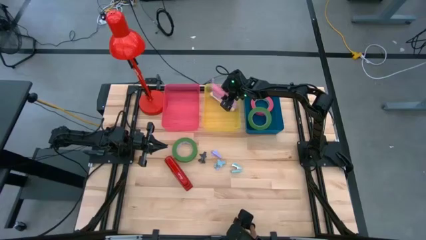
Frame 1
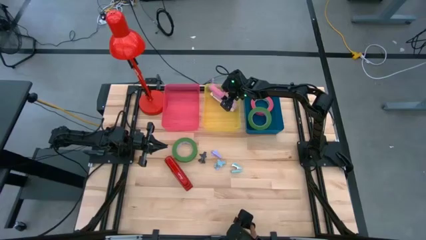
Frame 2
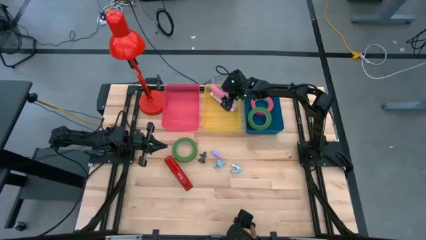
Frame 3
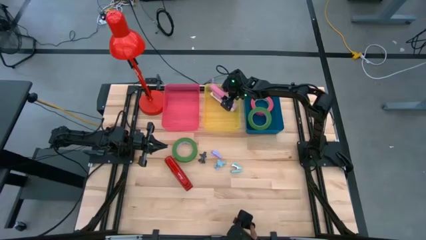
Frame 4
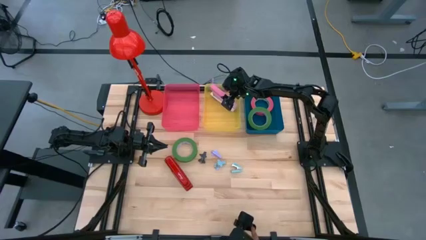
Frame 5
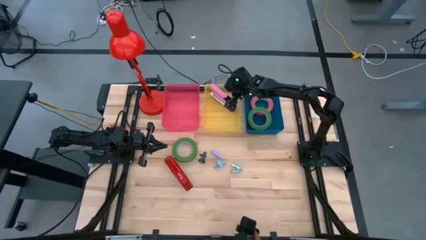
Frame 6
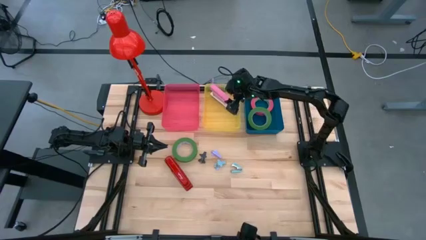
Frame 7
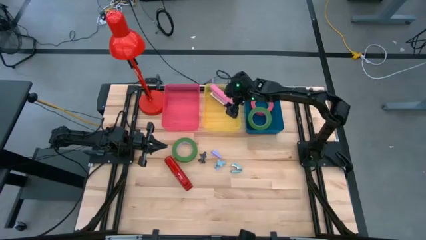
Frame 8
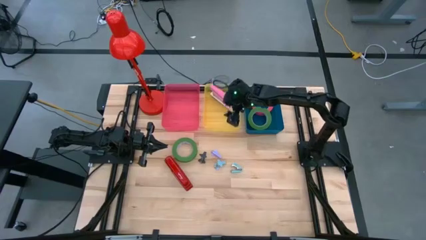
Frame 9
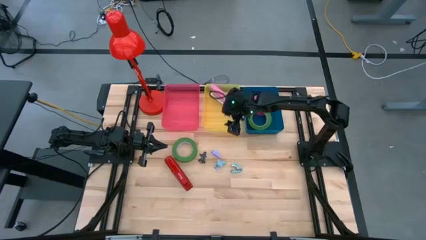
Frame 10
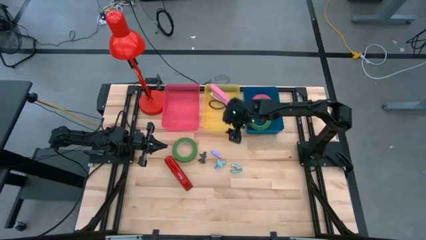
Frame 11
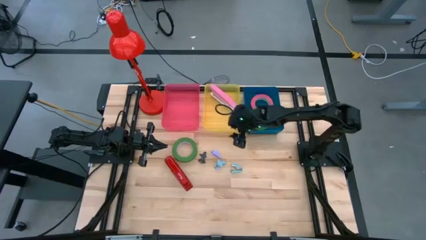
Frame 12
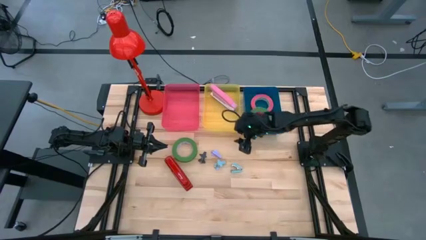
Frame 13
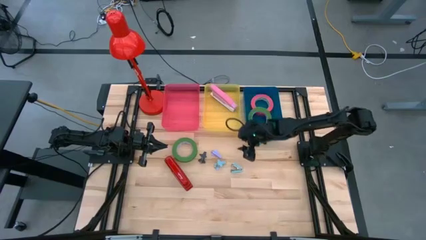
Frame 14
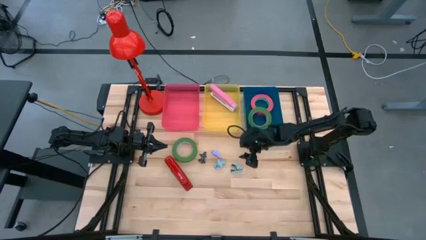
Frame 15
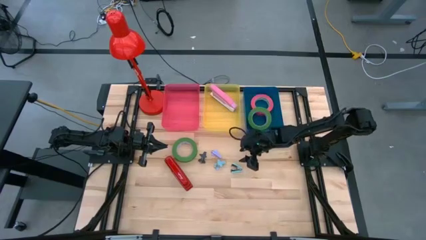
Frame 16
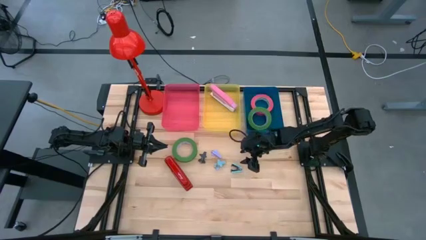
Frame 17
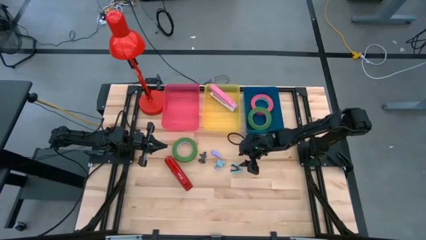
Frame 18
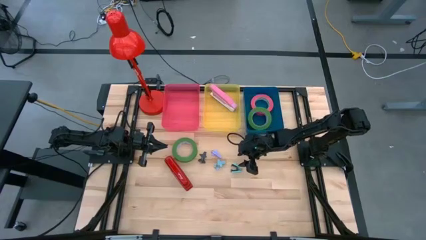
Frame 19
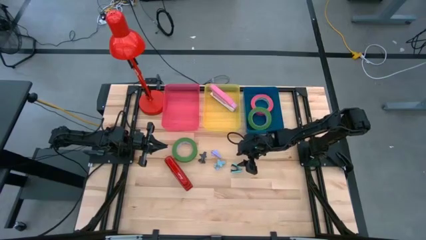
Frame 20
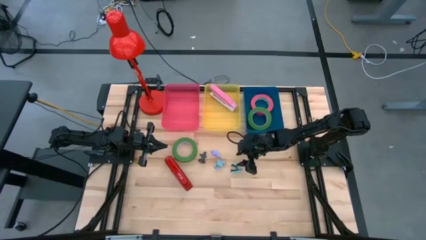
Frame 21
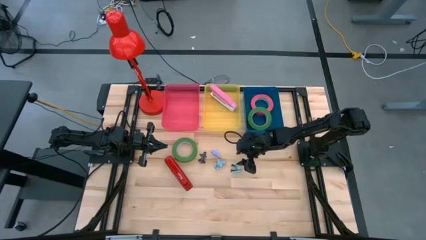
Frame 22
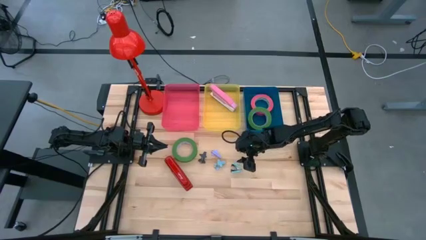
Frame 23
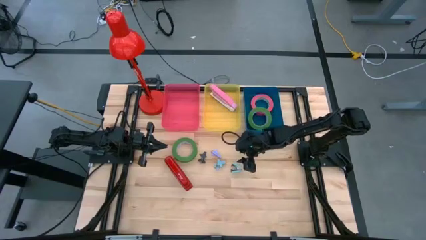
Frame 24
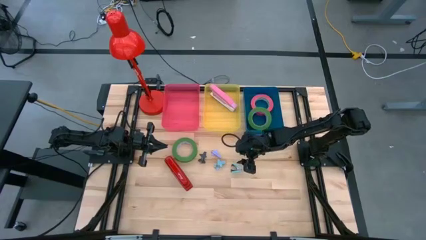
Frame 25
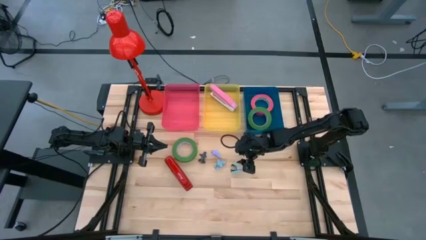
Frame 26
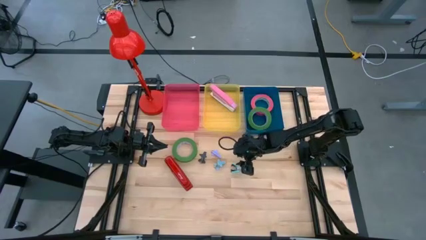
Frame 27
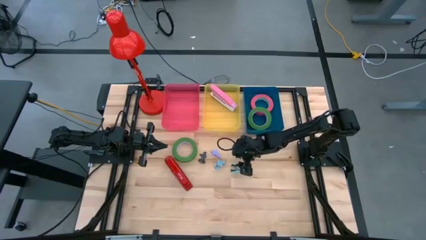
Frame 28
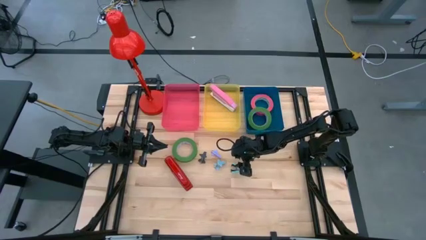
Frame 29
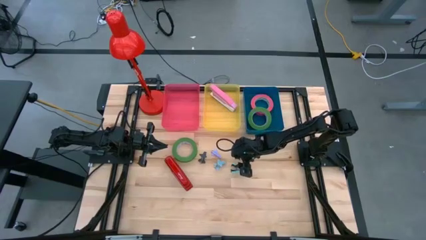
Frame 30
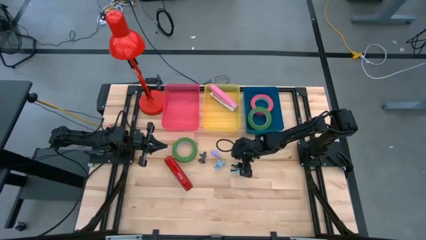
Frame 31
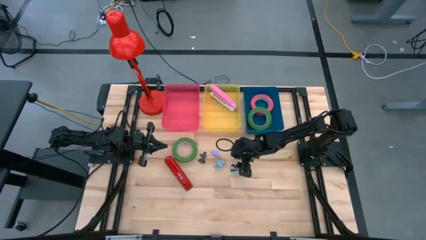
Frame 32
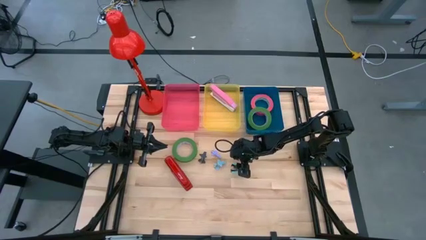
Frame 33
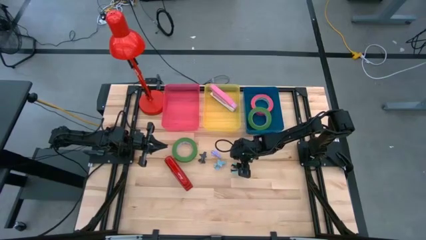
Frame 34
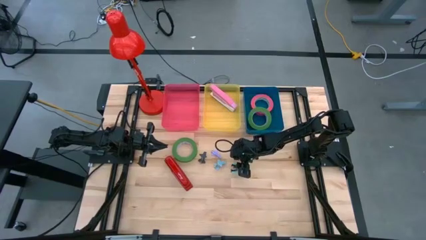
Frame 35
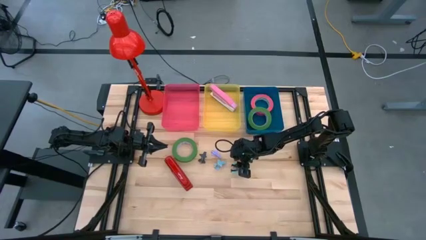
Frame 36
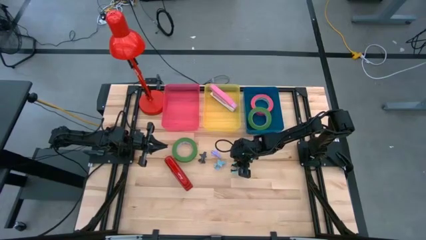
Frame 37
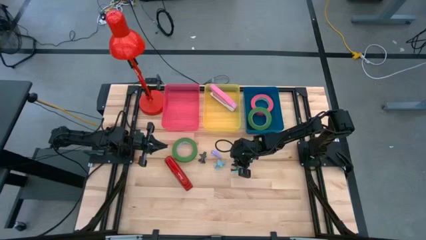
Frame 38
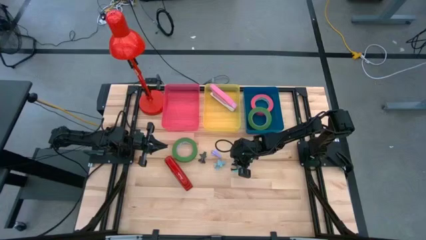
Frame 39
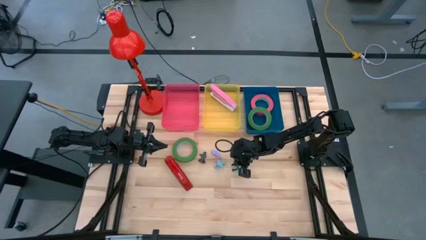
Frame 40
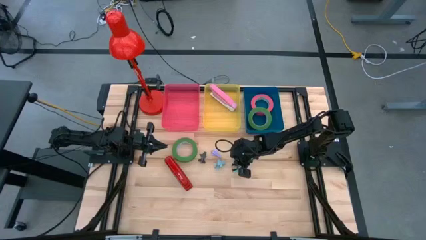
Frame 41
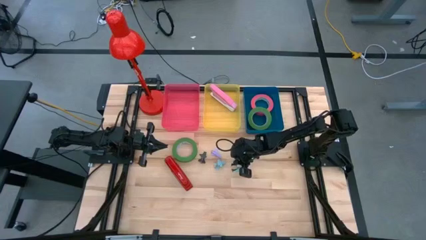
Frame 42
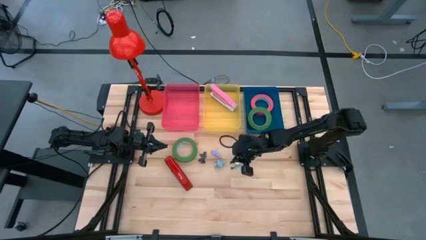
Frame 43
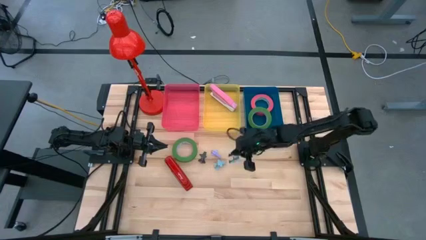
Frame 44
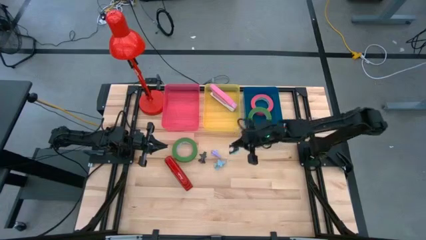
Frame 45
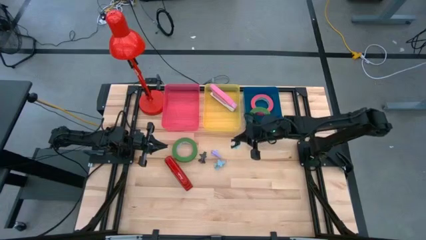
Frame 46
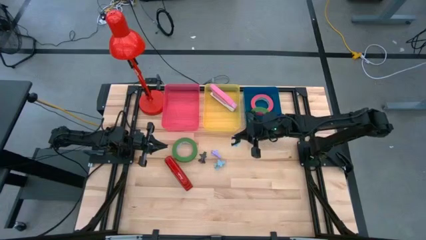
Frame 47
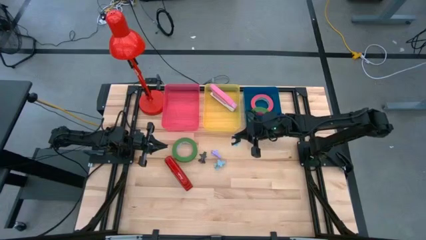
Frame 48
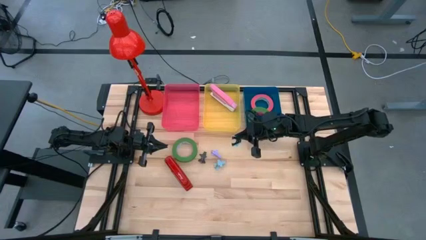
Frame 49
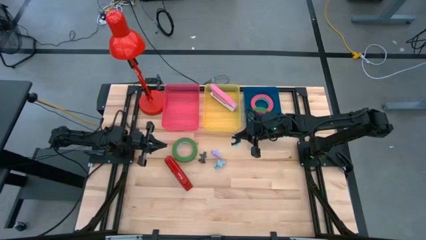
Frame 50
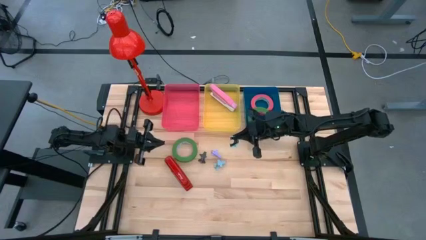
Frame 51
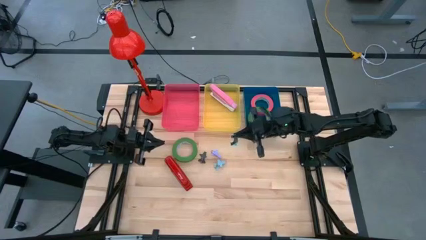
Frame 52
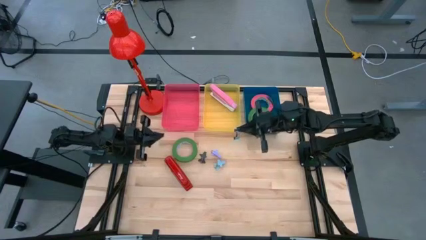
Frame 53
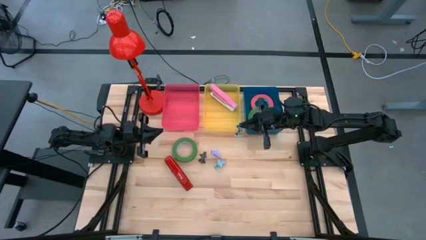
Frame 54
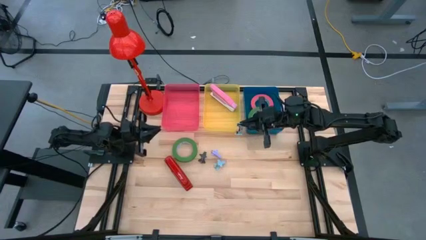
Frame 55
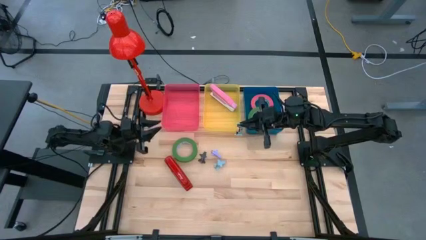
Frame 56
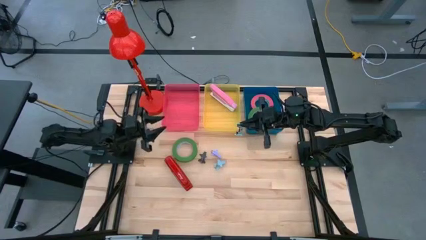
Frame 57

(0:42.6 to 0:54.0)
Task: Pick and place Stapler, Stapler remover, tape
Put the right blue staple remover into the pink bin
